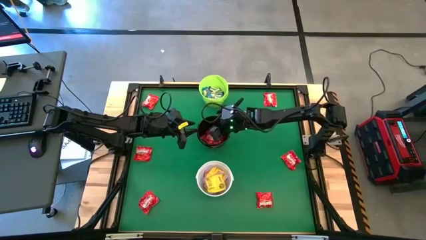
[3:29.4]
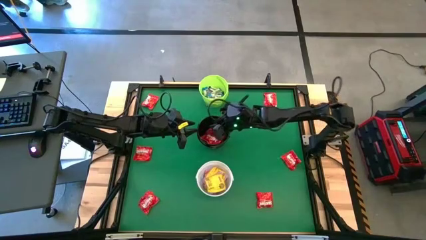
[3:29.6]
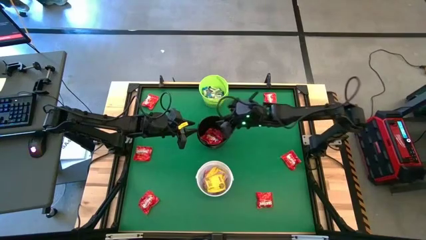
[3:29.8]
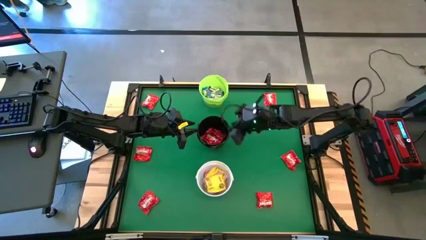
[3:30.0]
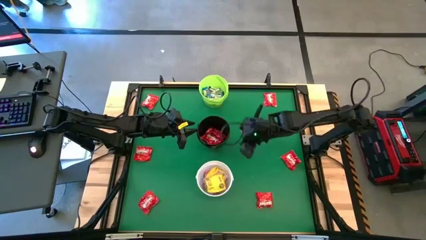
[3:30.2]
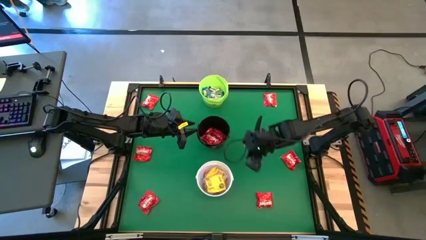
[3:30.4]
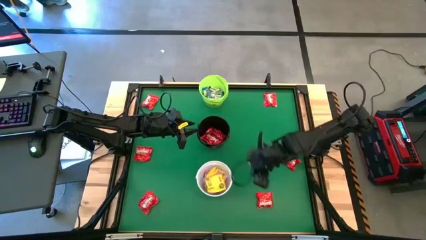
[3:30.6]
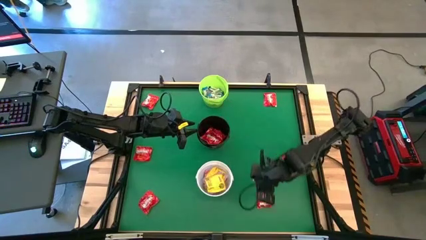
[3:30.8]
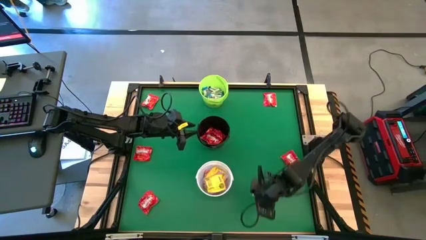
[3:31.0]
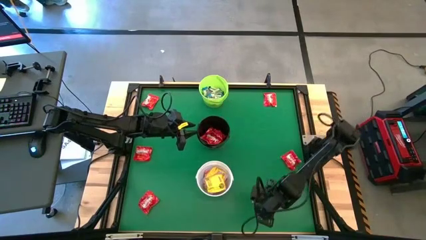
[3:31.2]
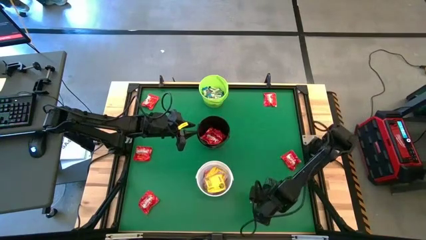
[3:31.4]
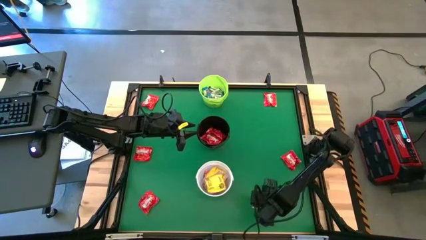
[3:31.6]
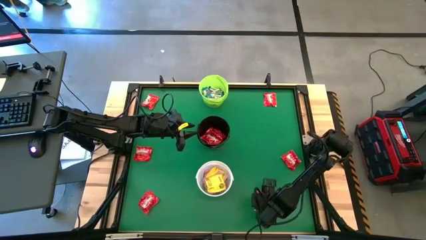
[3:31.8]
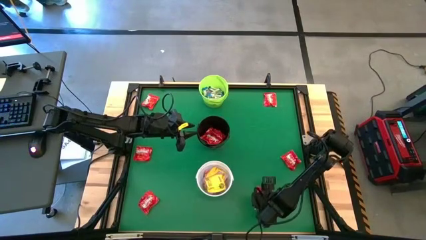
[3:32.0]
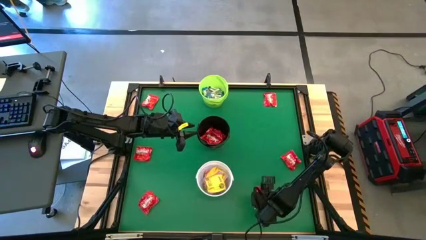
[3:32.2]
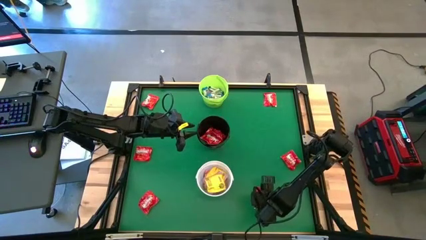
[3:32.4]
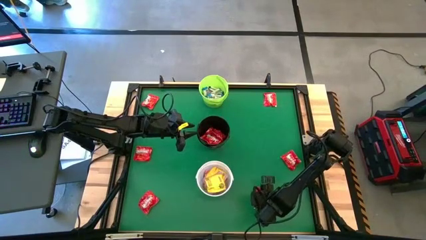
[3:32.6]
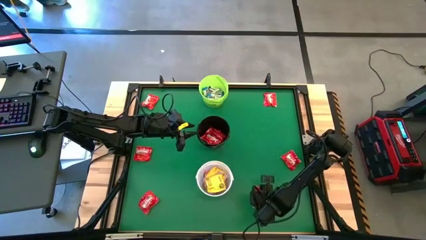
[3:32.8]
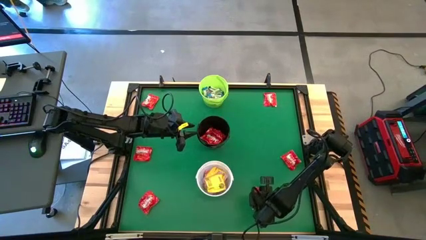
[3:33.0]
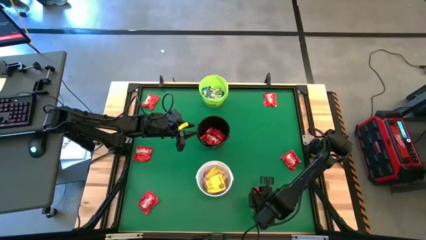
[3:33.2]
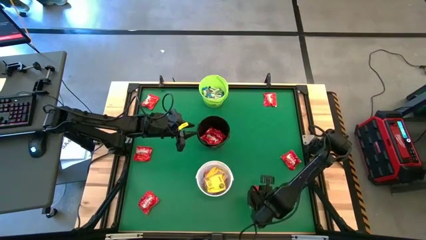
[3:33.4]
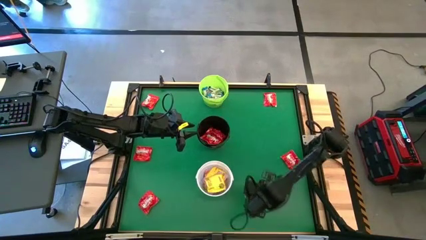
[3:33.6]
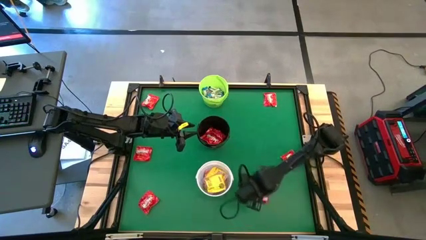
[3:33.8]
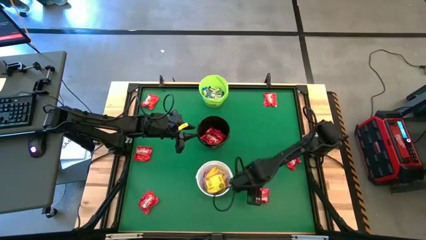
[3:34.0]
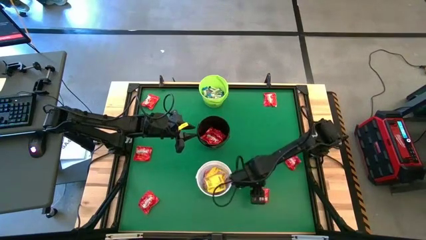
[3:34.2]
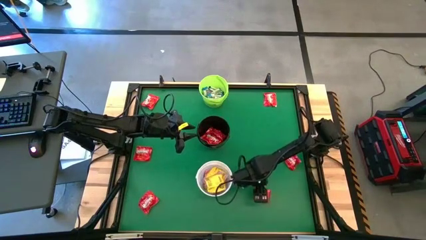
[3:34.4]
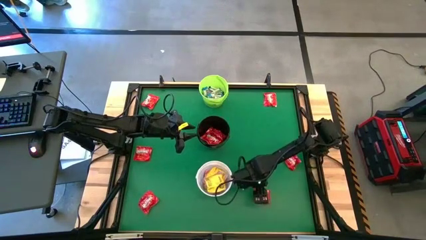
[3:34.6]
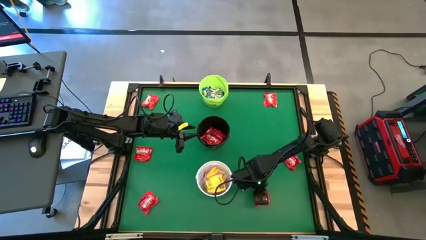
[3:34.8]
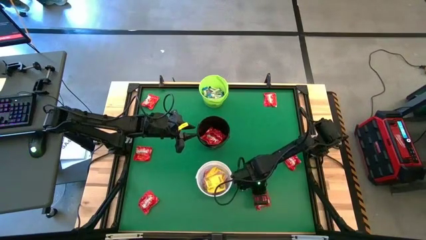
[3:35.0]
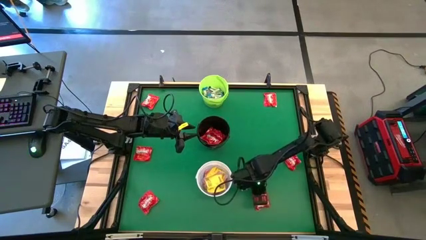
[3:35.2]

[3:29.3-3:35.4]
Task: Sort candy by brand, put in halloween buckets
Put the red chocolate into the black bucket

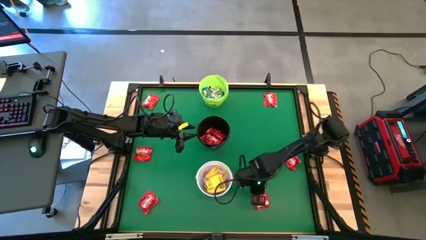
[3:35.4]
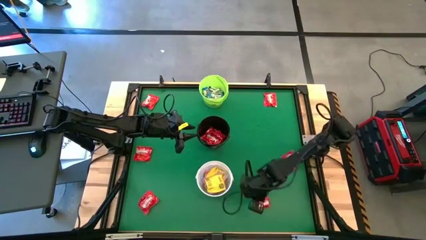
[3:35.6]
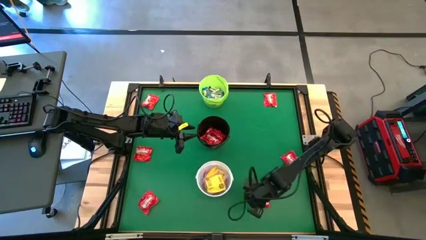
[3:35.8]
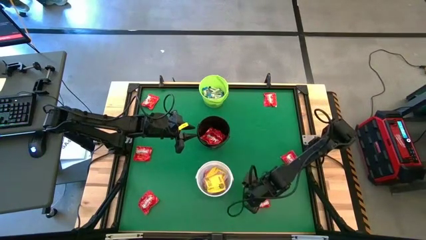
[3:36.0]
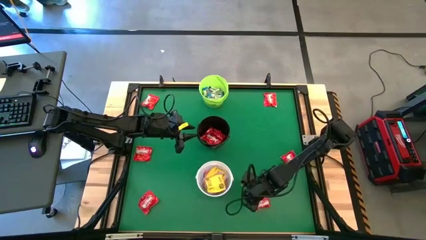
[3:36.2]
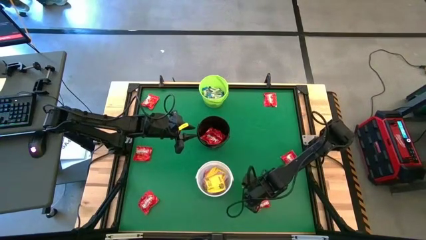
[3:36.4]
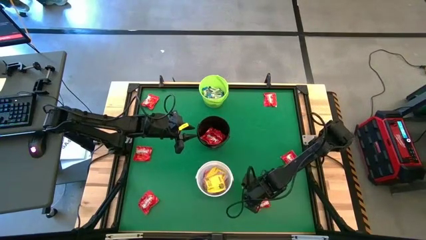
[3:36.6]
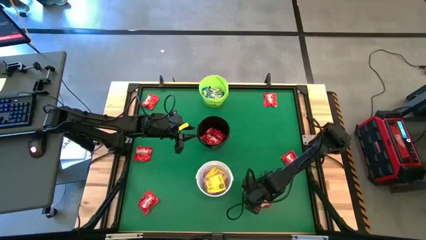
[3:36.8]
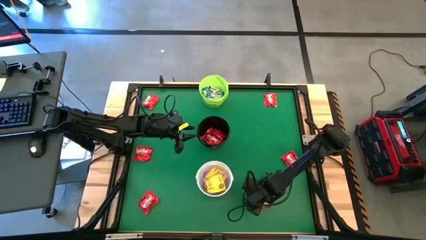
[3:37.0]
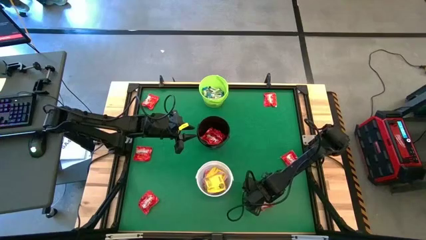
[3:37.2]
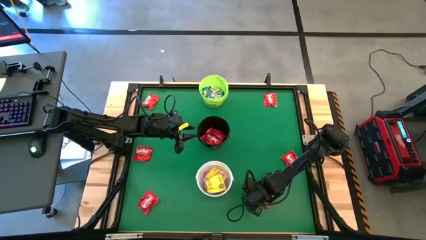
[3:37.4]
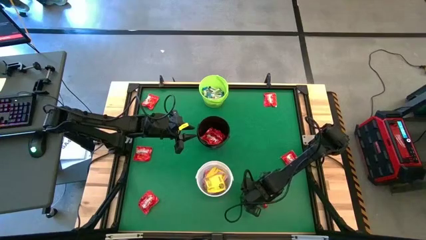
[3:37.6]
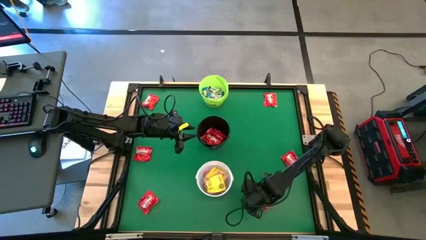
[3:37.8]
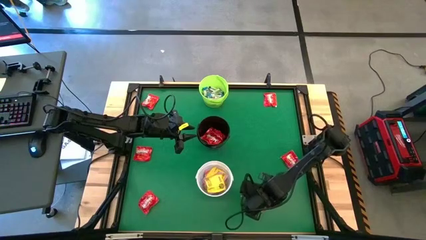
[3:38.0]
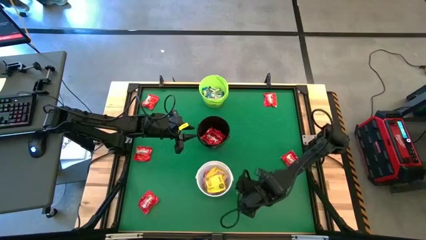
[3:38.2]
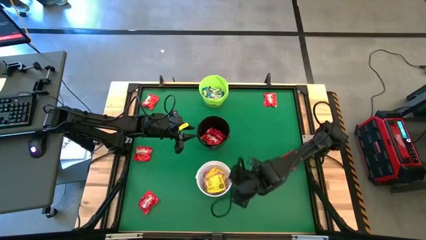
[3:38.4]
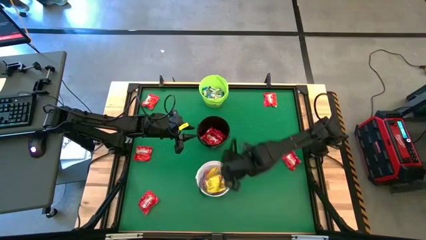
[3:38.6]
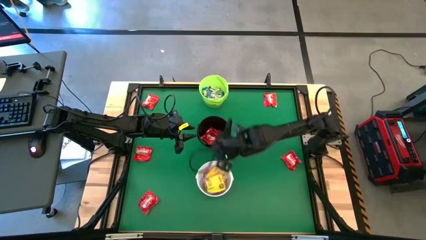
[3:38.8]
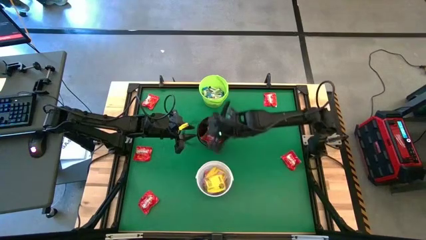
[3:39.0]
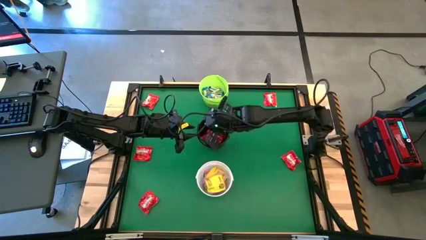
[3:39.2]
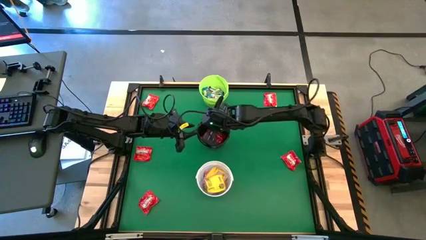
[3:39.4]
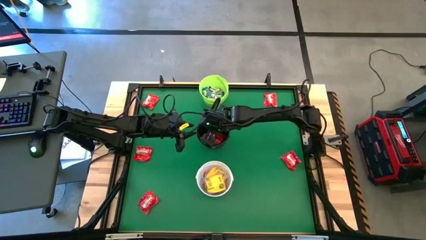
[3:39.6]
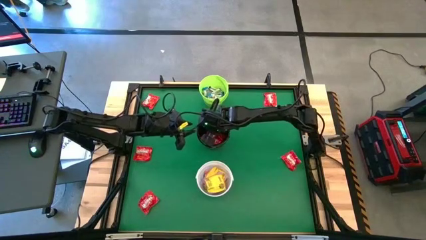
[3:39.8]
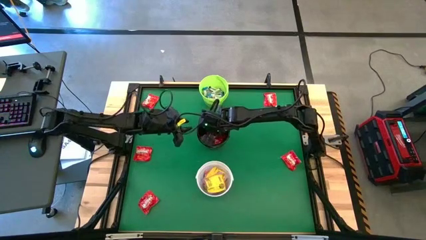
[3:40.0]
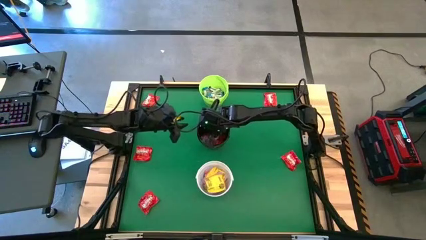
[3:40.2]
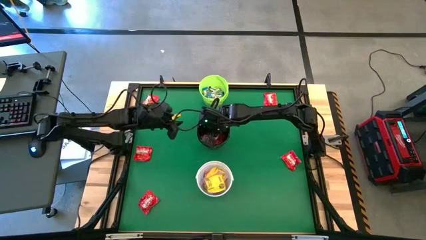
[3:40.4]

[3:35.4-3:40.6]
Put the red chocolate into the black bucket

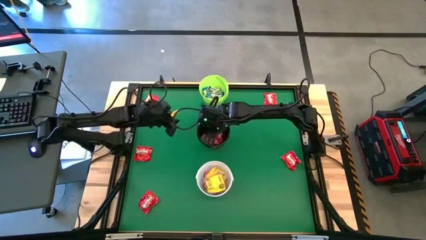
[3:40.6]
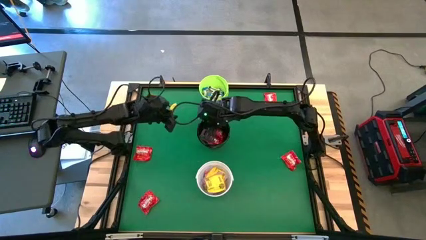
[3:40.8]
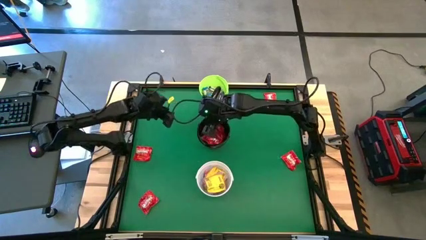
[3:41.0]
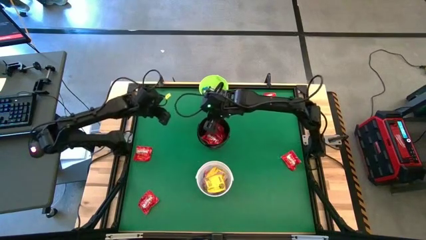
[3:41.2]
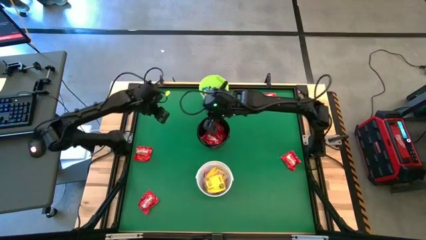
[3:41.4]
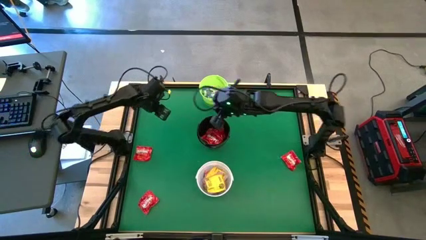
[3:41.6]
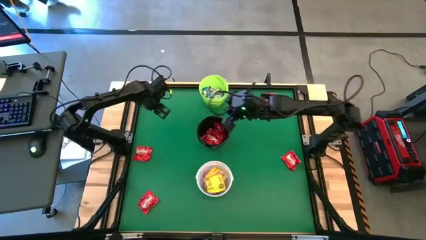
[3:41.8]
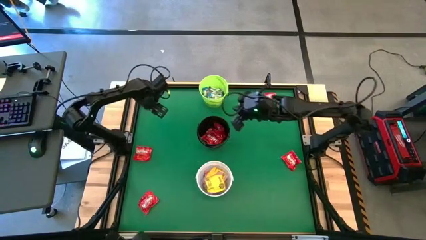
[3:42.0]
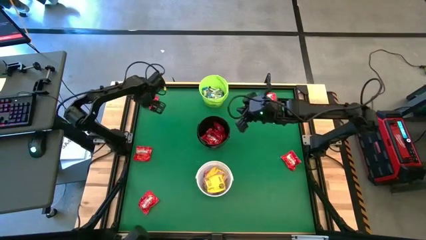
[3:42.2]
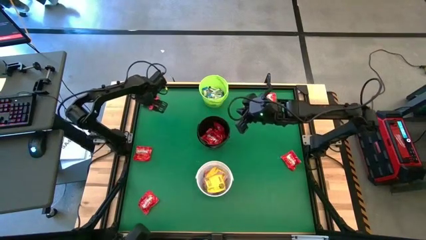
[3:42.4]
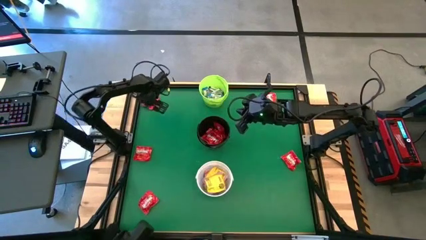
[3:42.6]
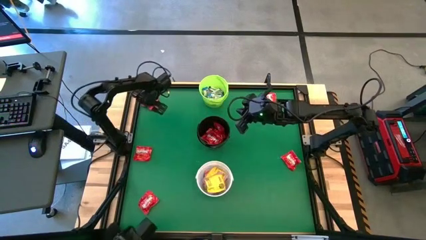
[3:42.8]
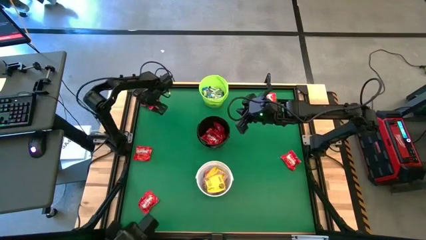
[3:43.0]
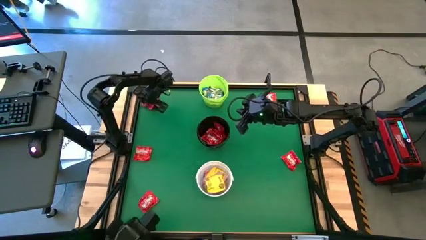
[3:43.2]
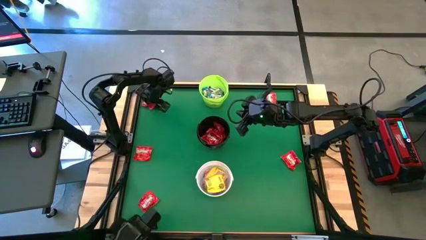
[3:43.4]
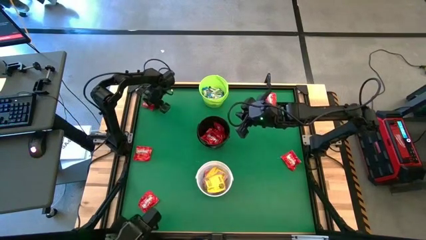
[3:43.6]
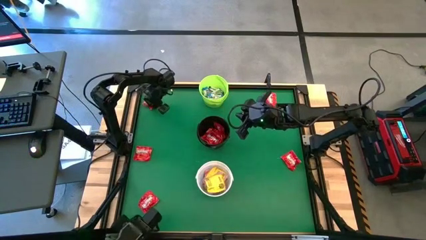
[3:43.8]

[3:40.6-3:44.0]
Put the red chocolate into the black bucket

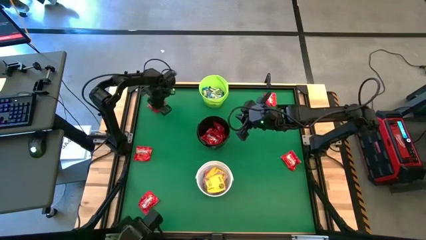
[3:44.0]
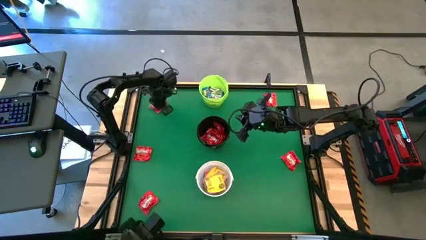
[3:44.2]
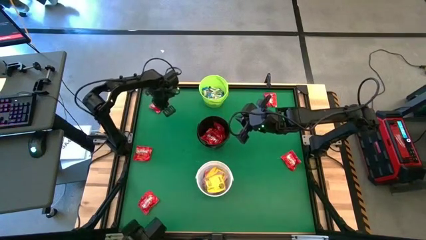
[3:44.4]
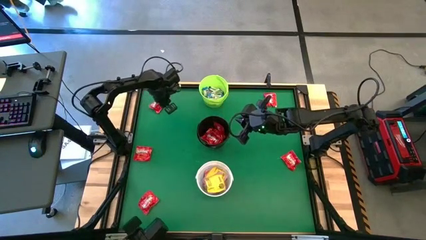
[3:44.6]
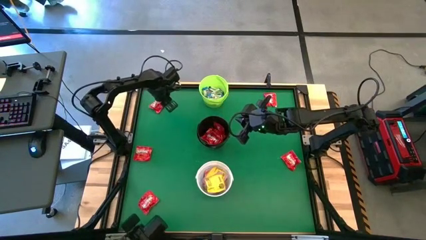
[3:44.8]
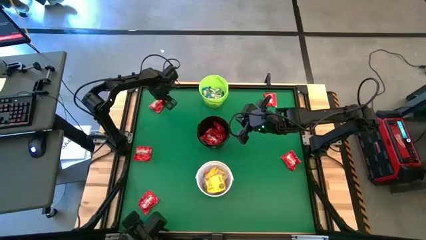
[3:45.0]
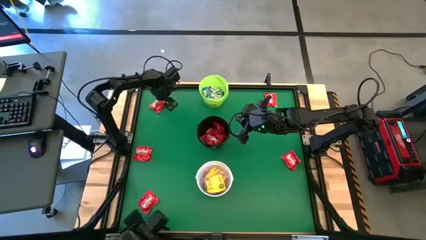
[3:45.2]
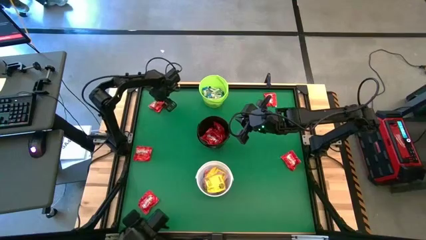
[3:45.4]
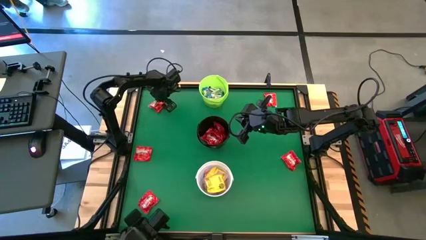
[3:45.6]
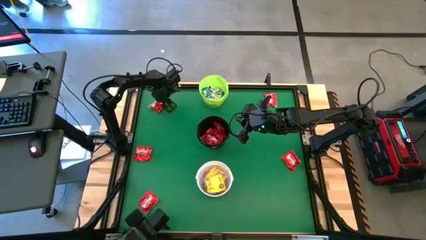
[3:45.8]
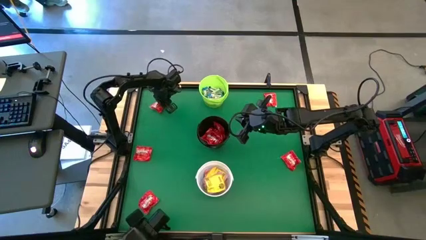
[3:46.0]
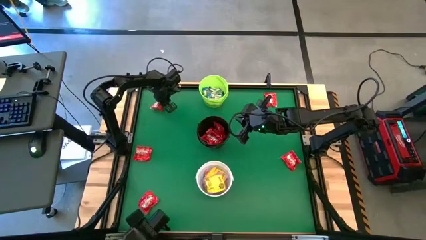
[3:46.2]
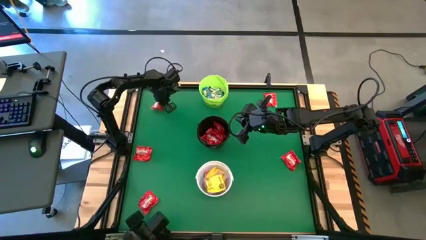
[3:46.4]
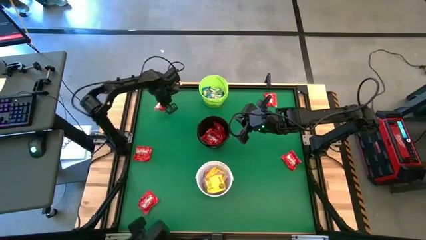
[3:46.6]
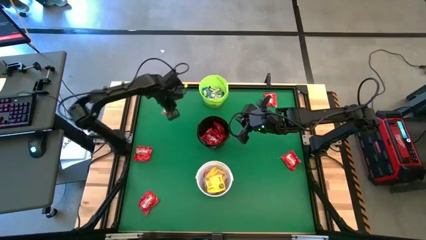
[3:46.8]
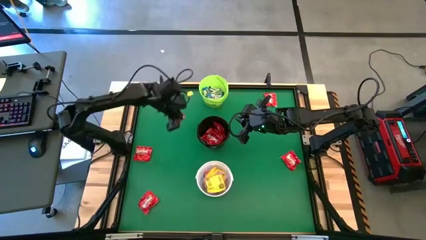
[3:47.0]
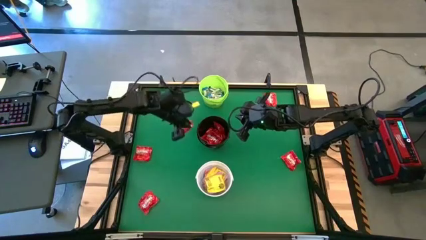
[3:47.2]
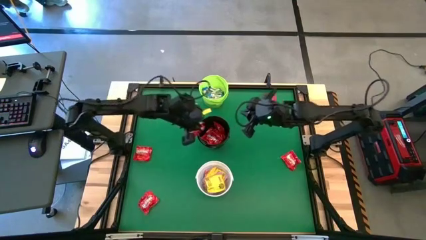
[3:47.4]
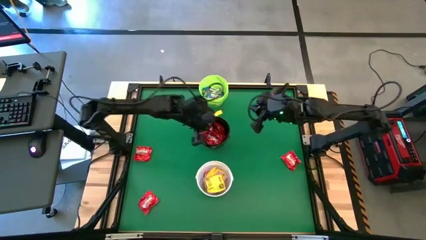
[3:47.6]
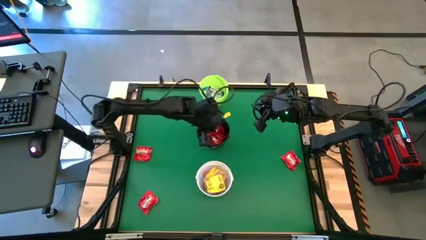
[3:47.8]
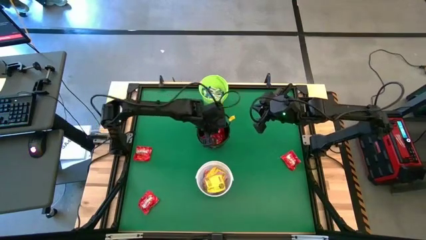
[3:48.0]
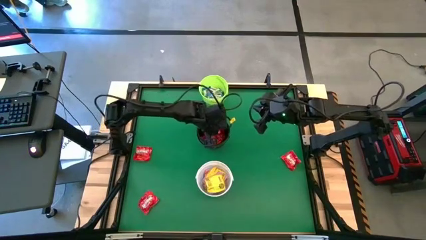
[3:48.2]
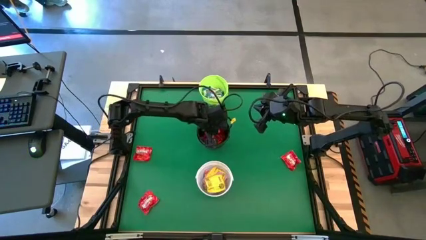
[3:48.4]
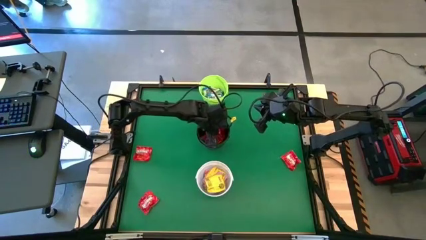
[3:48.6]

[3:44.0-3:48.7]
Put the red chocolate into the black bucket
